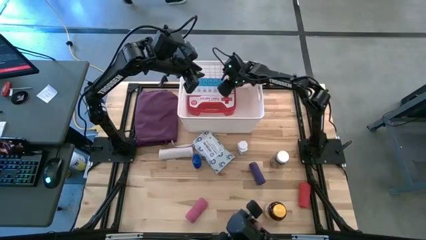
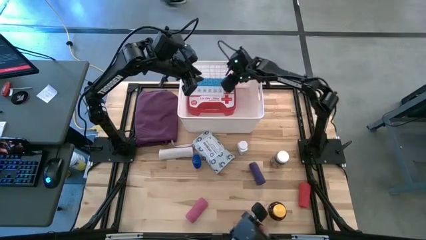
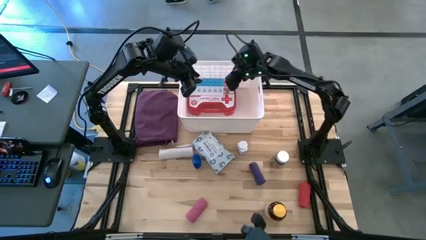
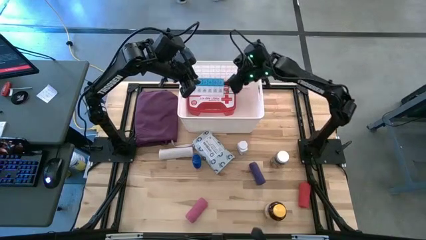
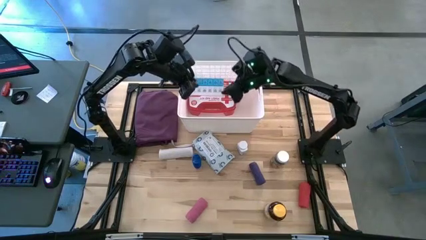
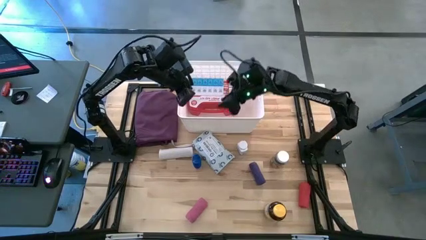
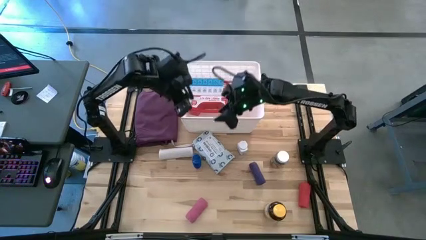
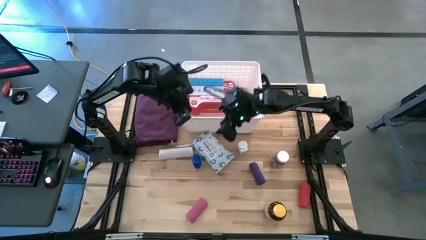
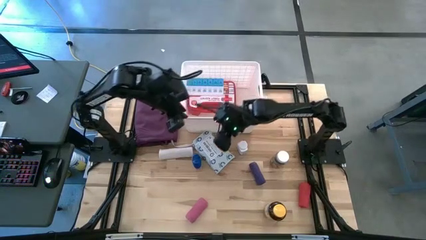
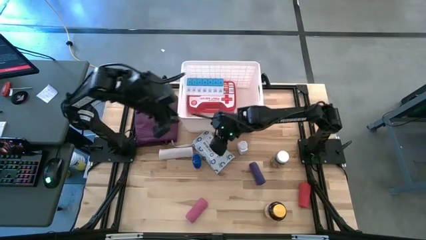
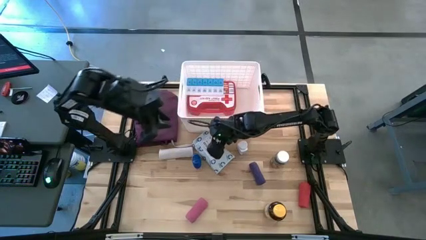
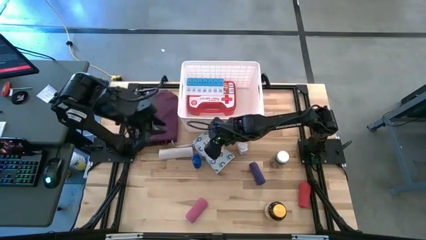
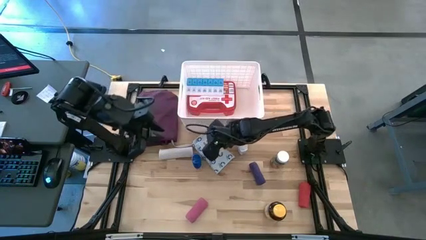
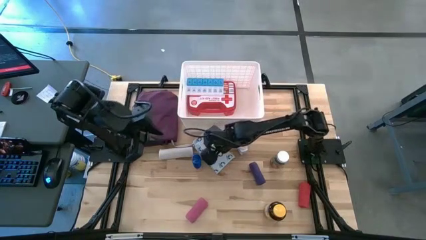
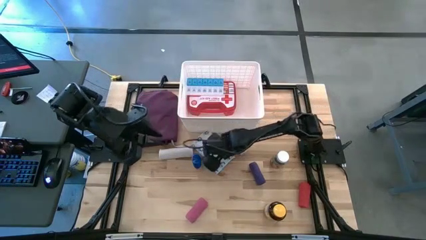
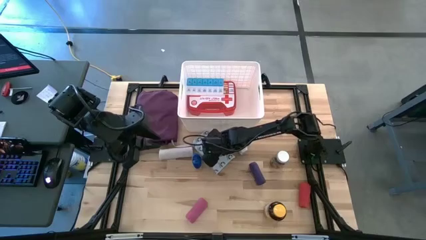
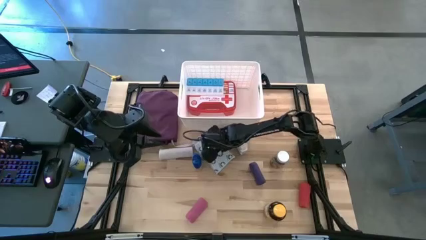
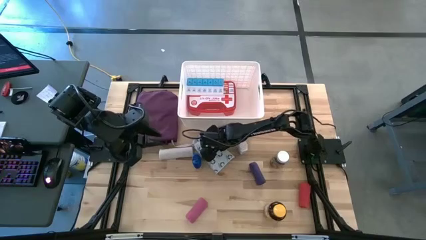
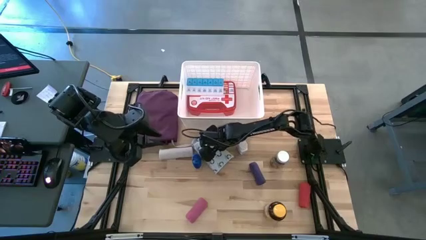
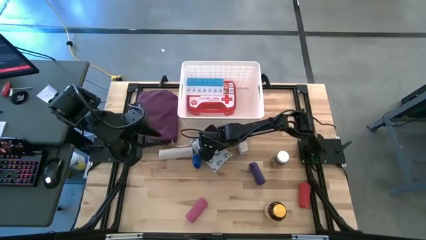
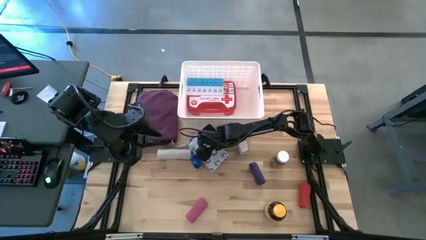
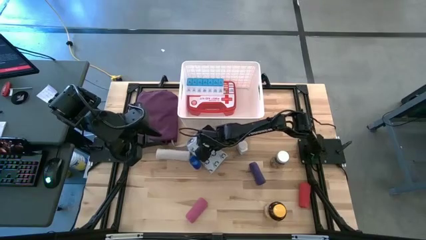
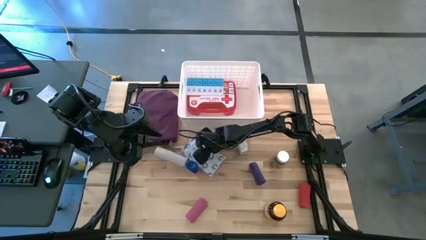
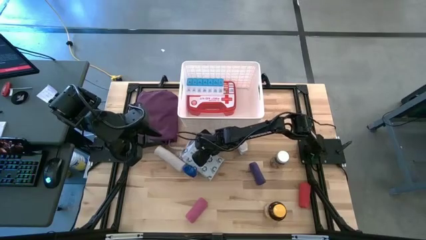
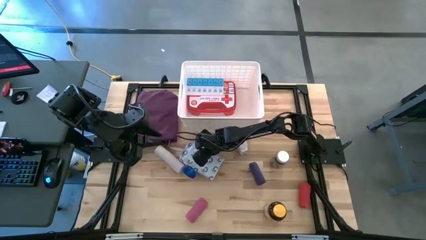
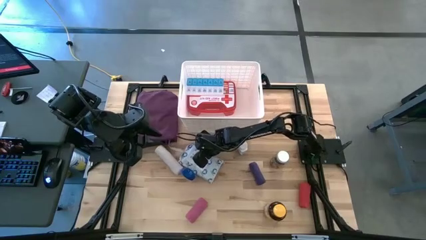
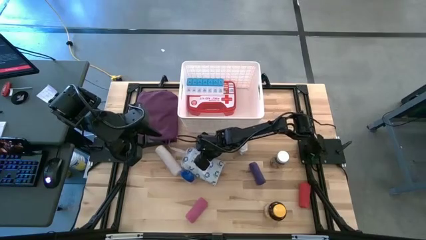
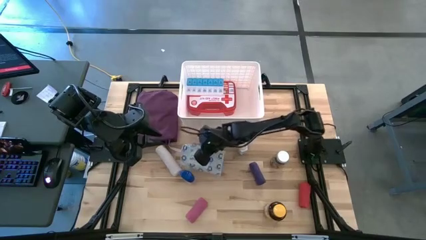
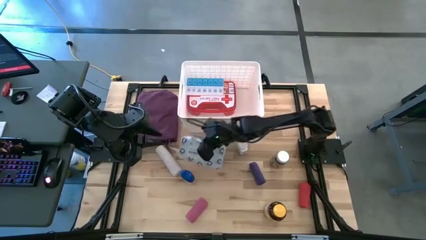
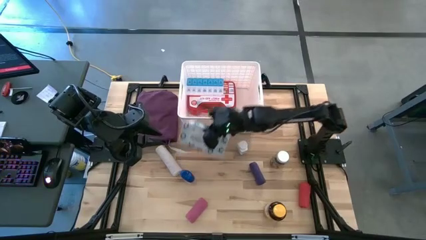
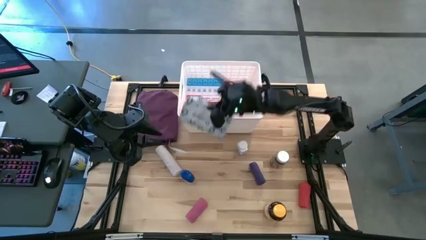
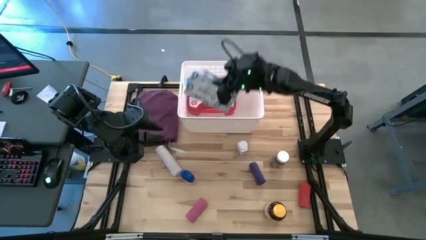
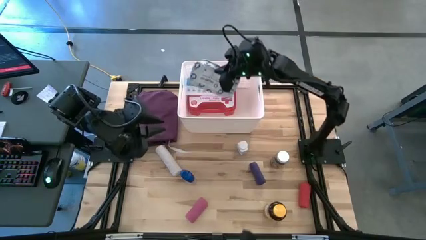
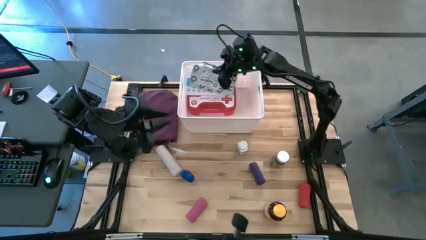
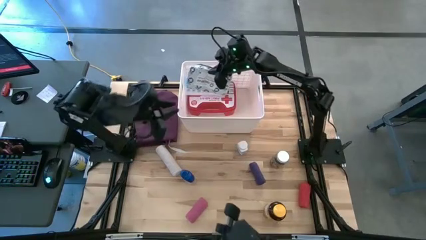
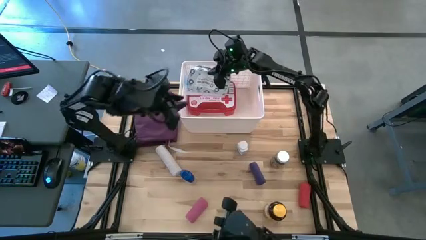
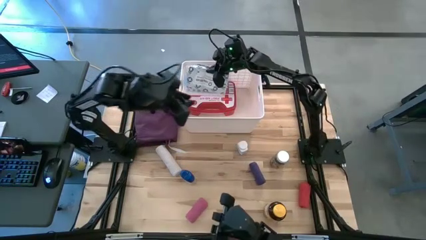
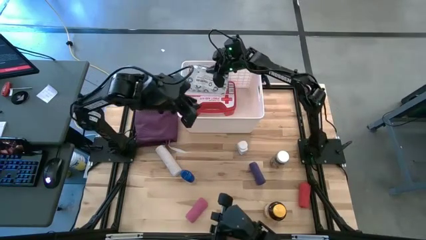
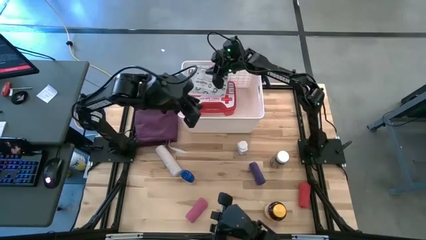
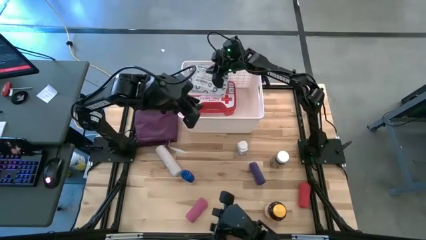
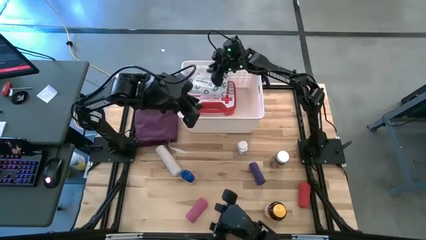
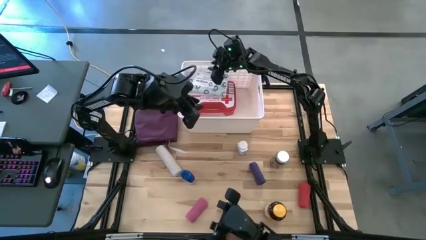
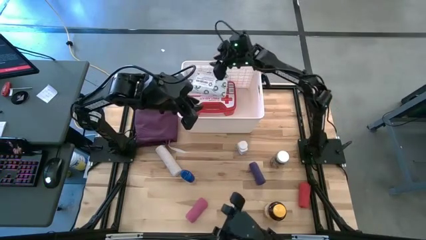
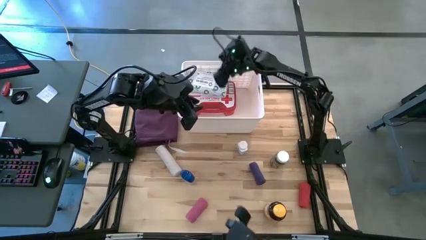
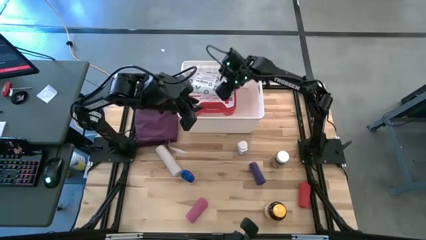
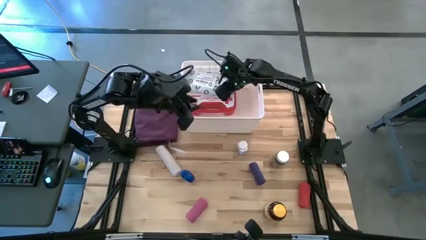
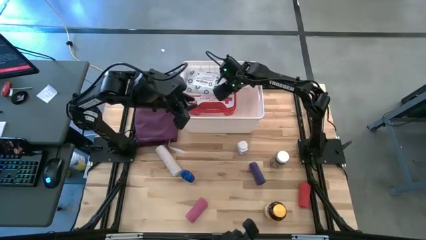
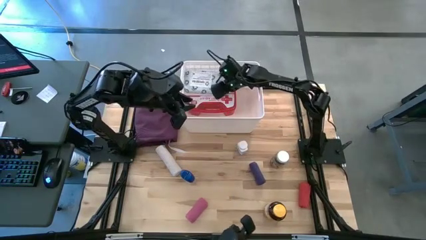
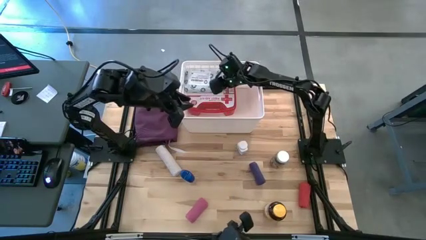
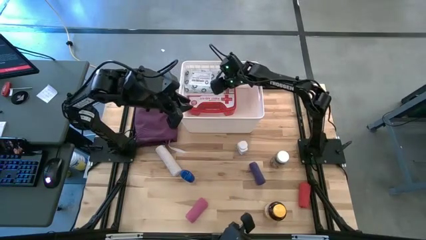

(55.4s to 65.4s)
Task: Pick & place medical supplies in basket/bin
Put the white mailer bag into the white bin

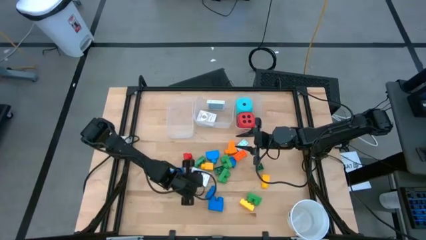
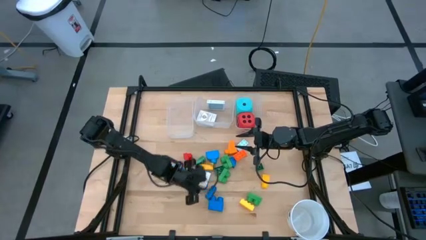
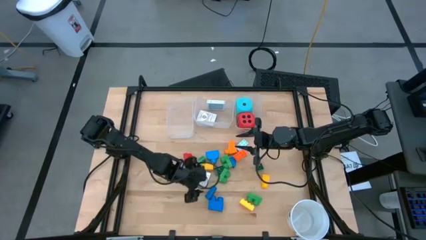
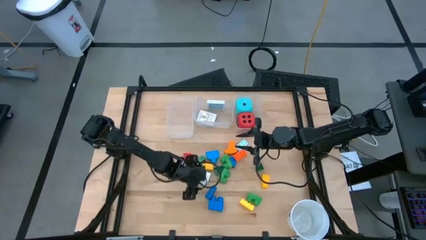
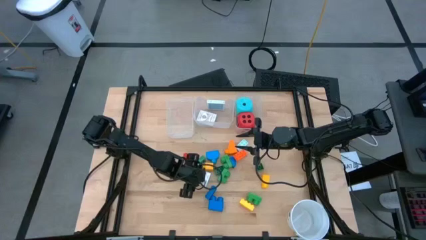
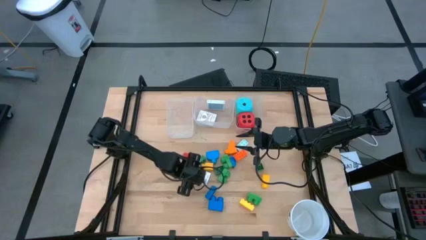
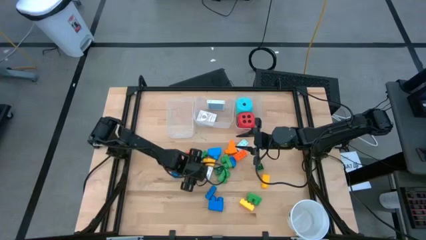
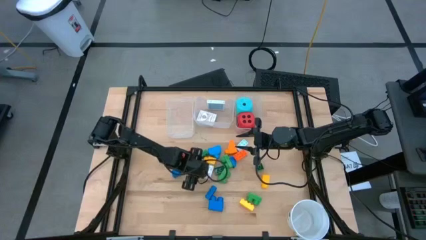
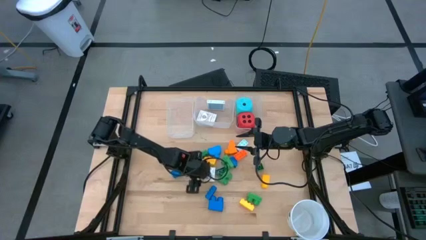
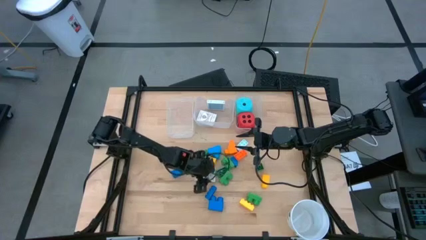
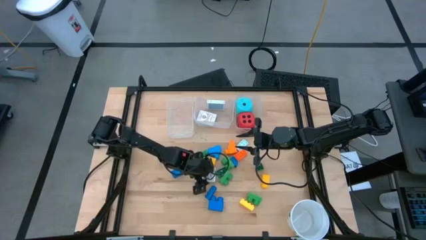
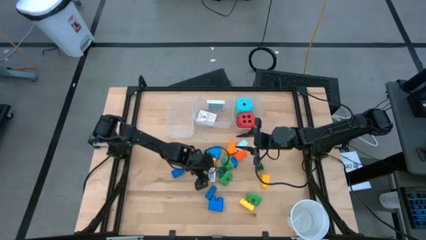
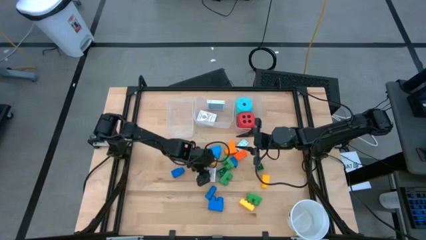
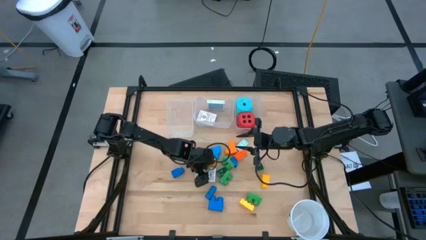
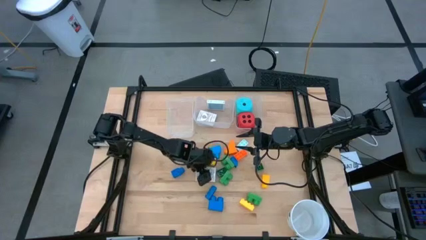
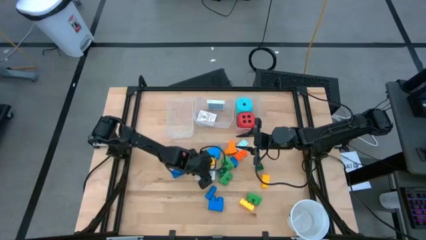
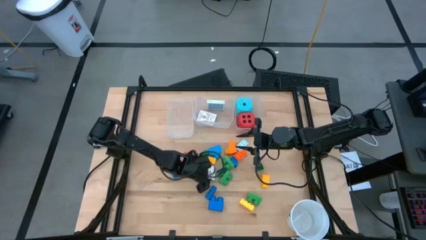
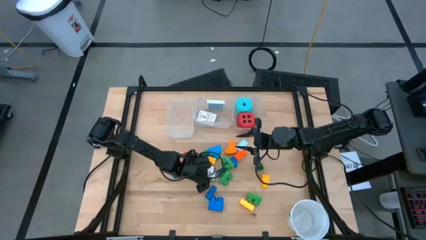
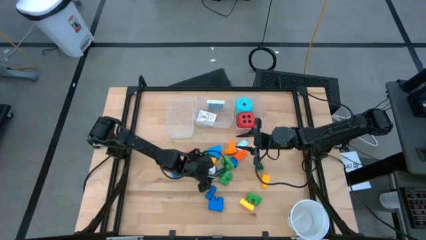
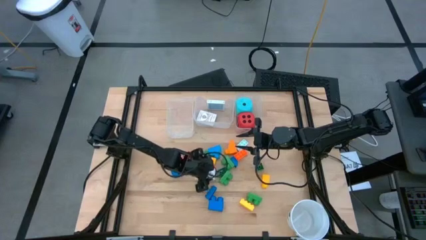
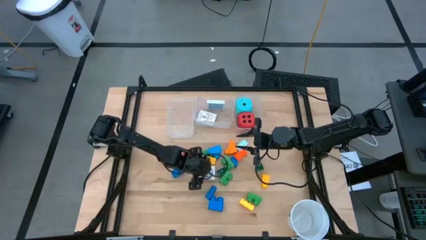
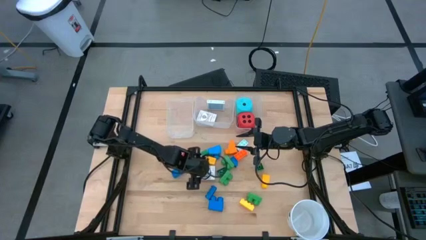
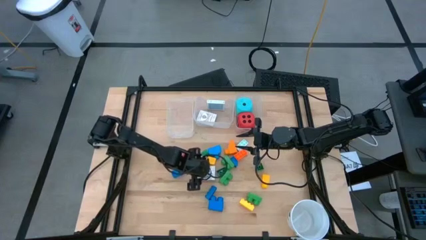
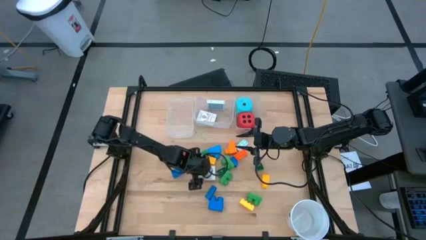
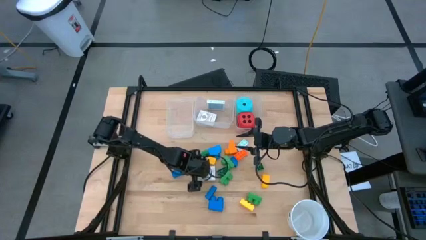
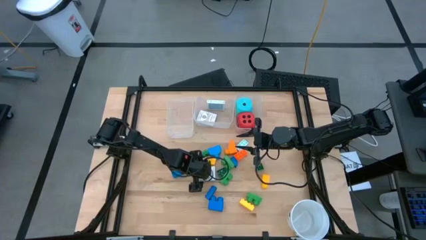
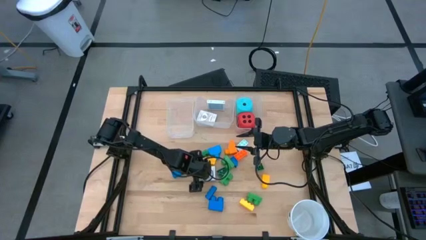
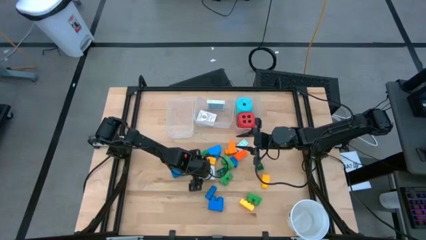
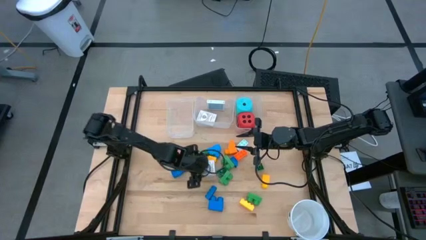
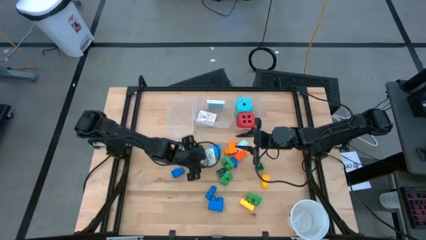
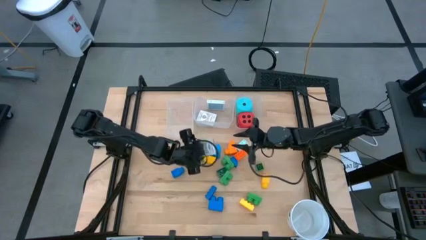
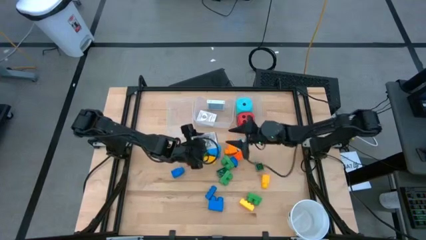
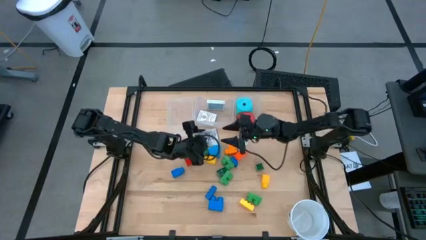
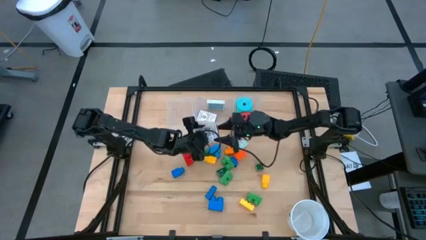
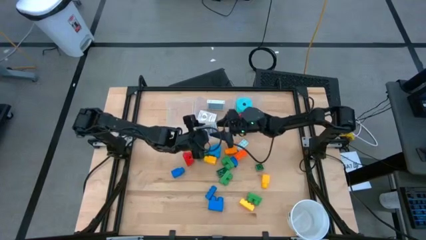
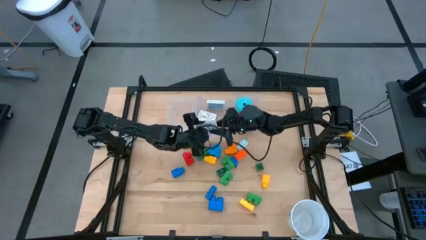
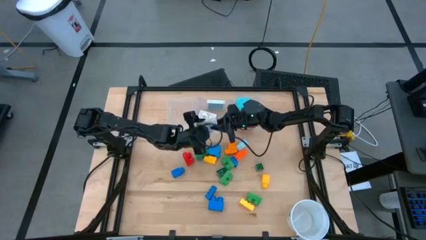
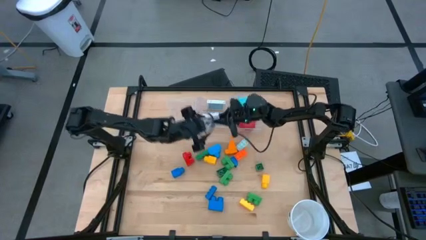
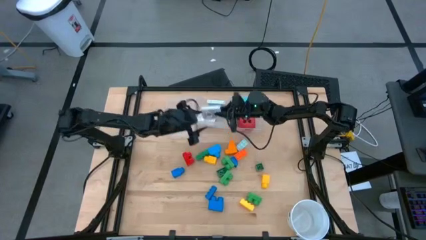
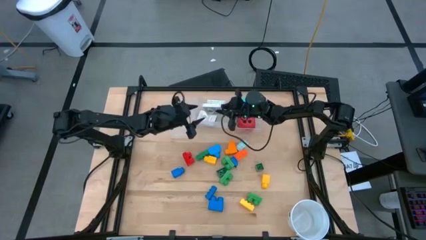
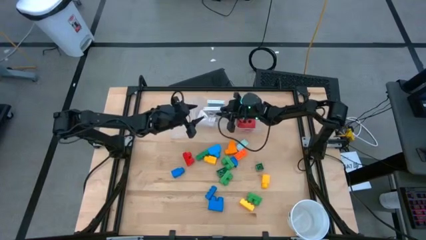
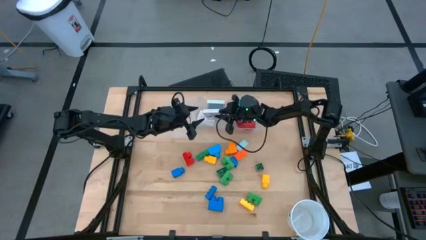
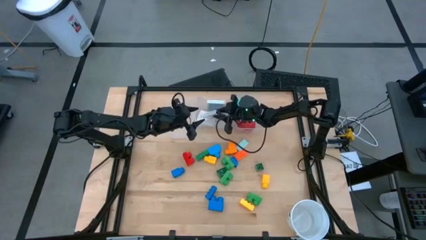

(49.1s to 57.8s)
Task: Pick & Place Toys
Put the black deck of cards into the middle transparent bin
